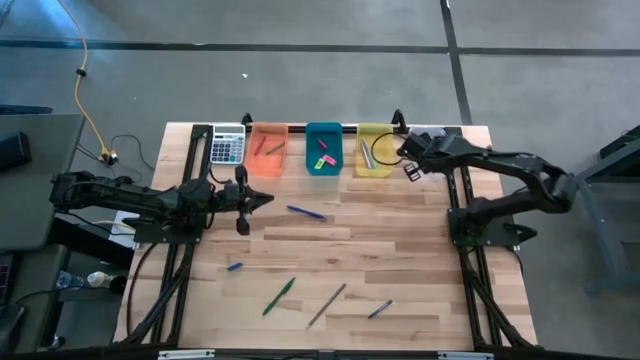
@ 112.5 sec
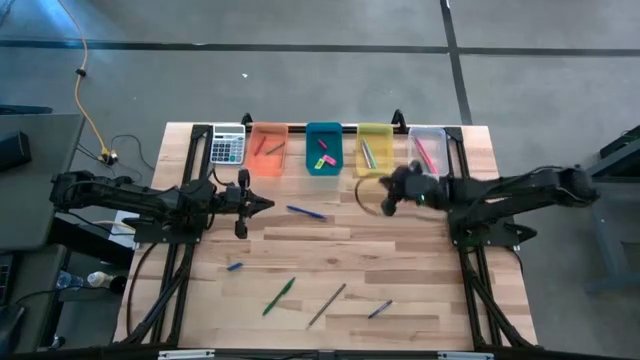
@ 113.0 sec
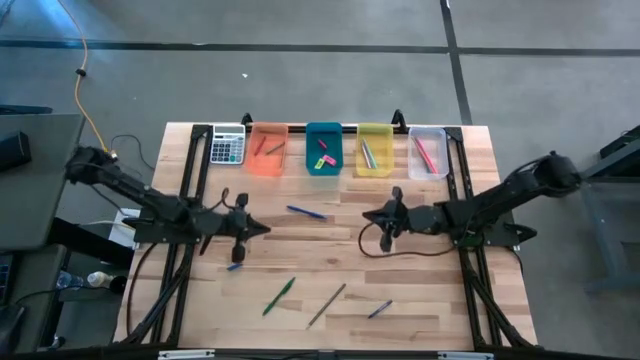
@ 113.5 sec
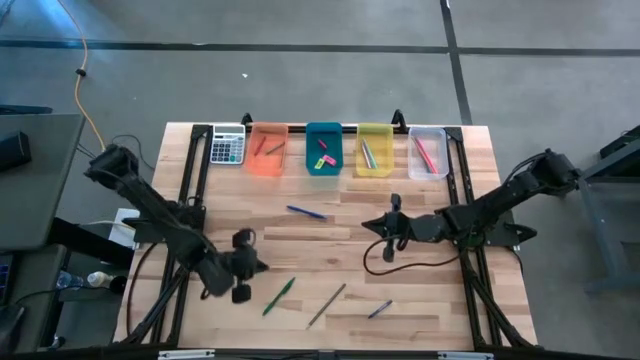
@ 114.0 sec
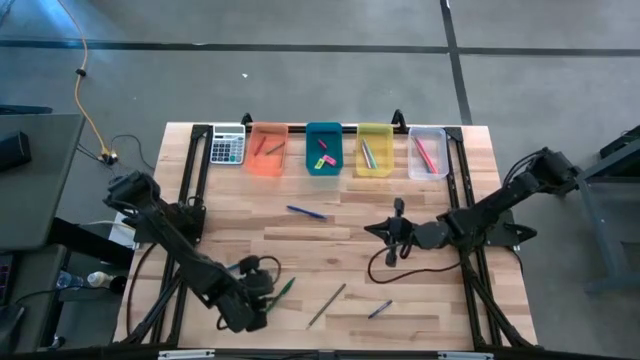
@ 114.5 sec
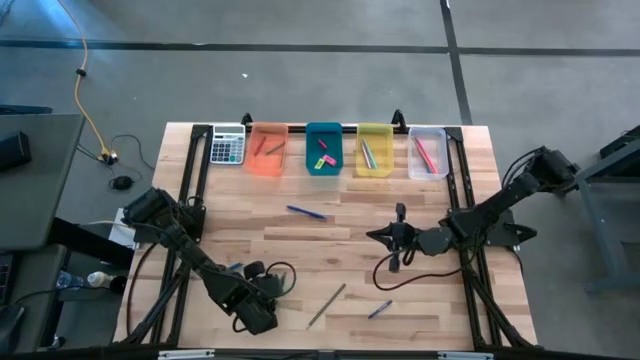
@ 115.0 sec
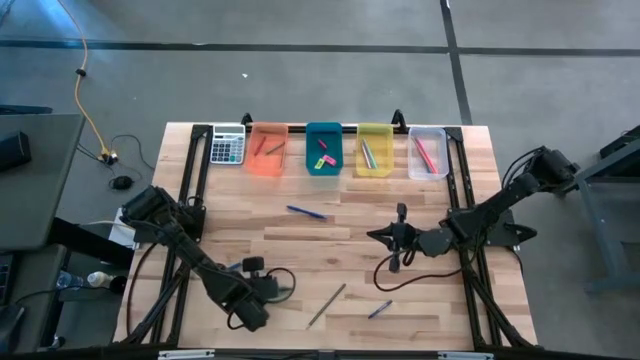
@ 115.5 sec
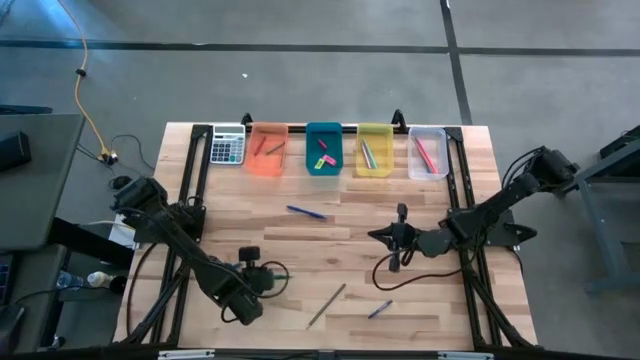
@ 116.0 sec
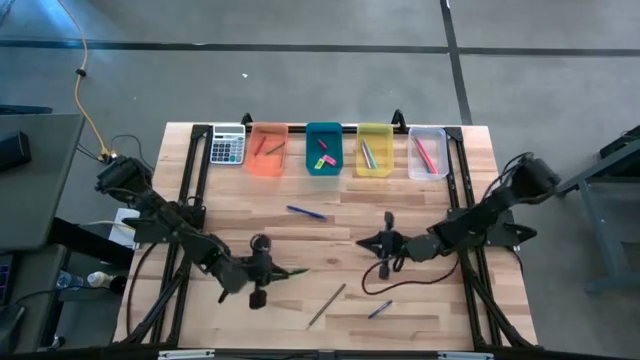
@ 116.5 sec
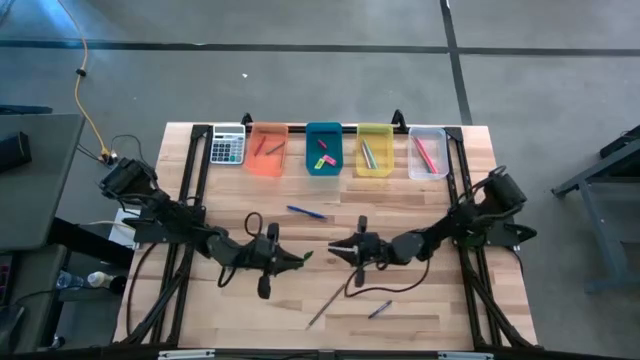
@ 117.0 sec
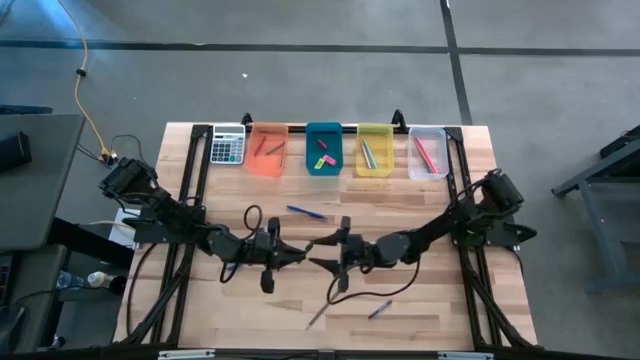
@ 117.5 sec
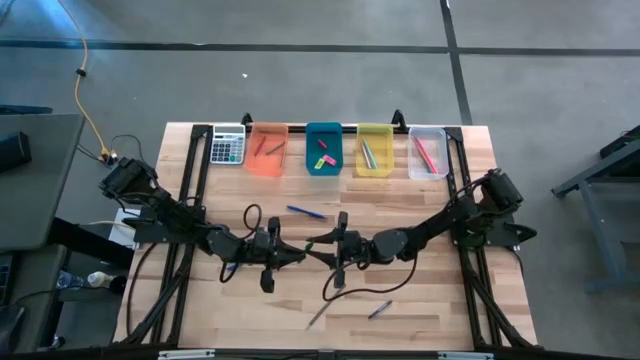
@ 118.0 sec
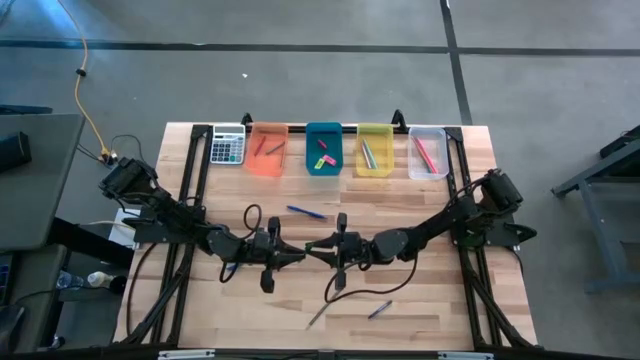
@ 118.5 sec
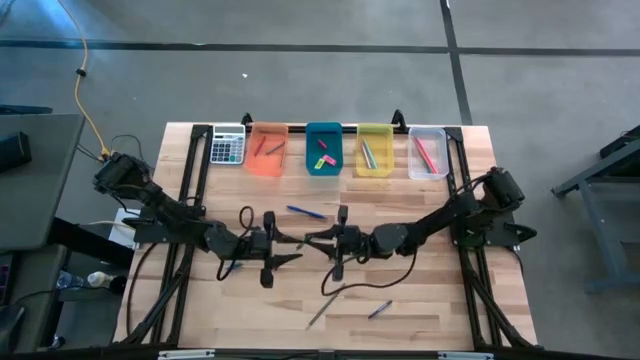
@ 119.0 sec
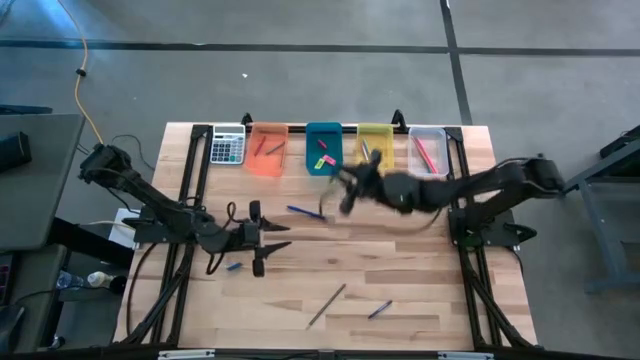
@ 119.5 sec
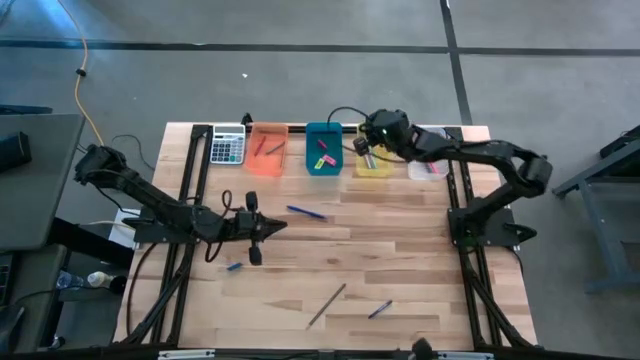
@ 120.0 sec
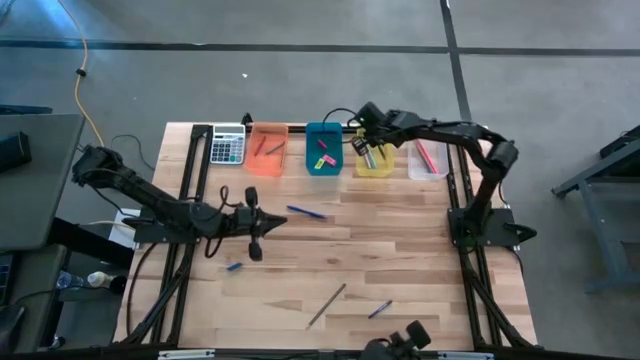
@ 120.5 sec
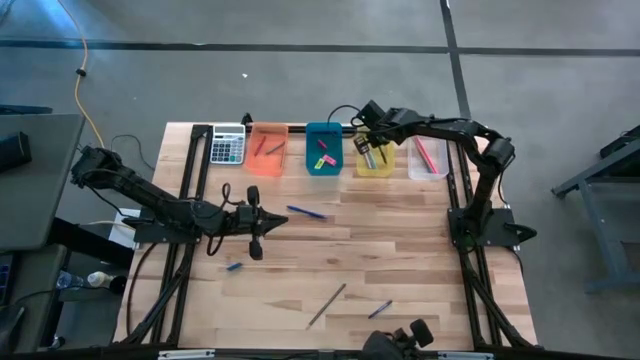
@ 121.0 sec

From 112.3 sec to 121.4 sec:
Task: Sort crayons/erasers/pens/pencils in bins
Put the dark green ballpen into the yellow bin

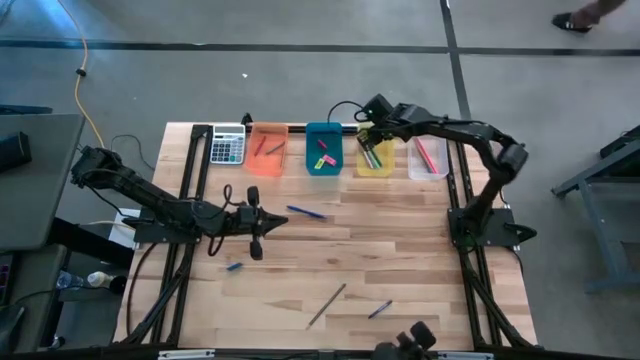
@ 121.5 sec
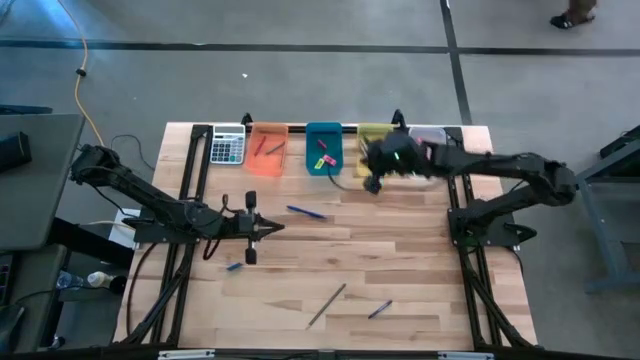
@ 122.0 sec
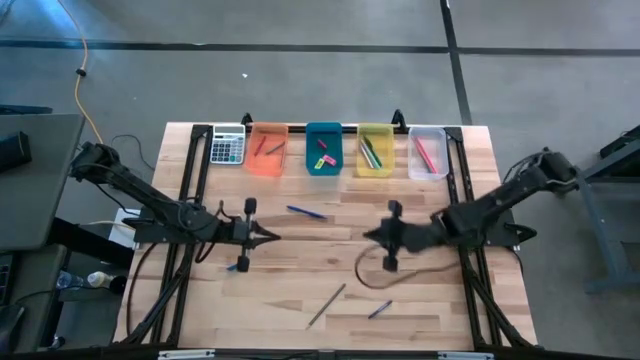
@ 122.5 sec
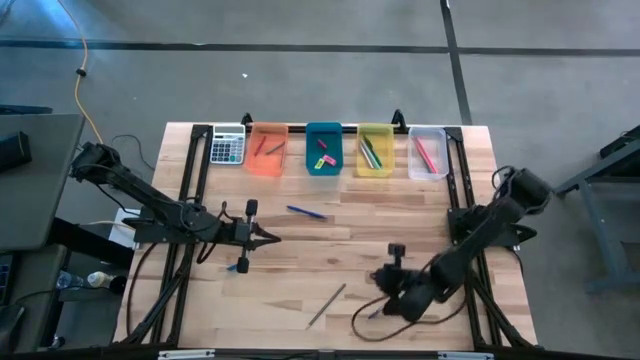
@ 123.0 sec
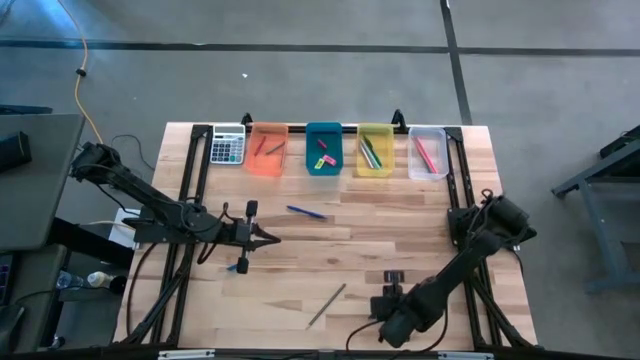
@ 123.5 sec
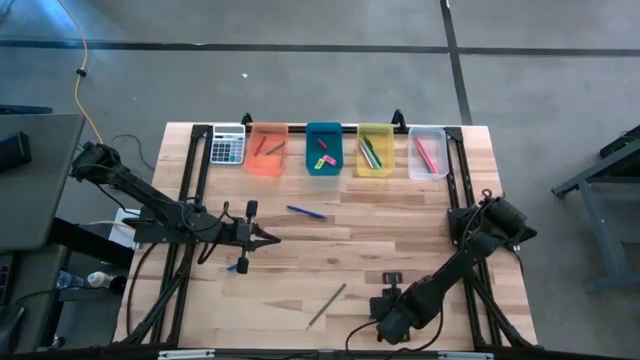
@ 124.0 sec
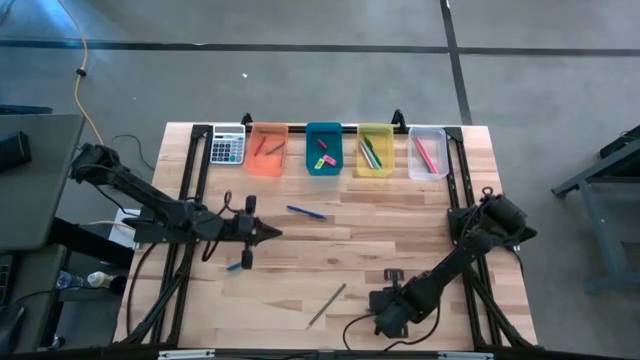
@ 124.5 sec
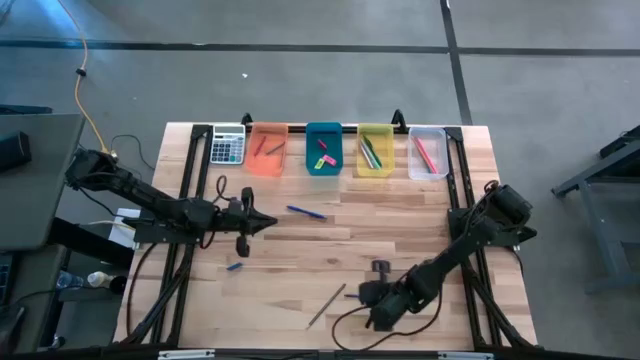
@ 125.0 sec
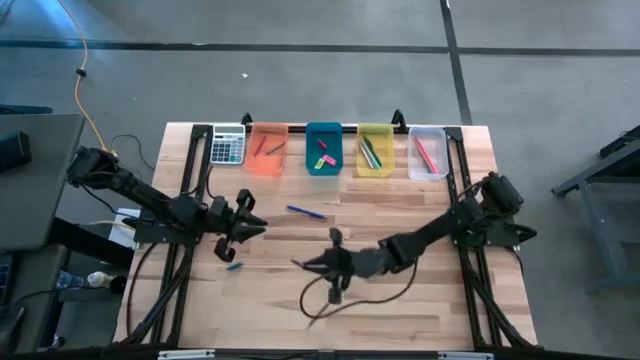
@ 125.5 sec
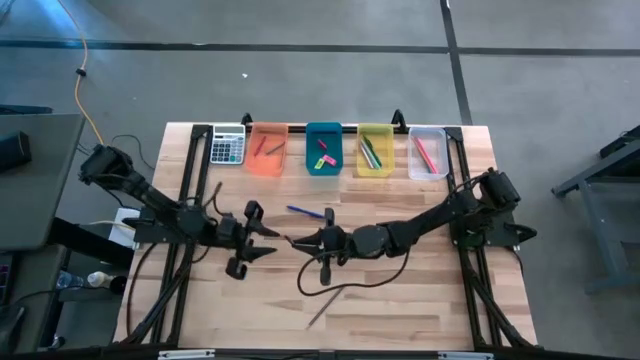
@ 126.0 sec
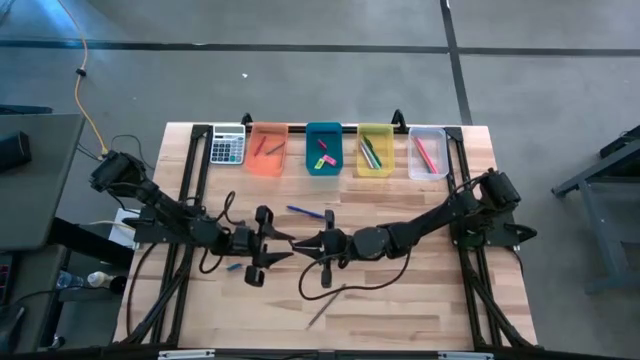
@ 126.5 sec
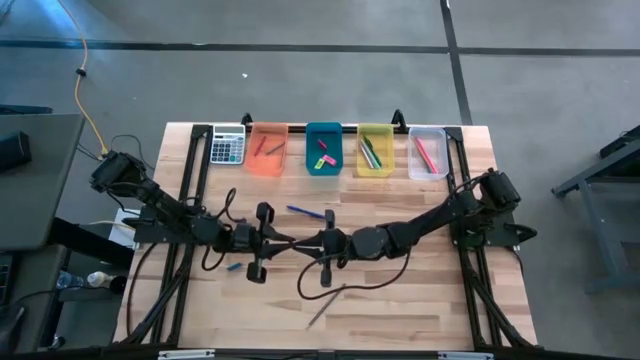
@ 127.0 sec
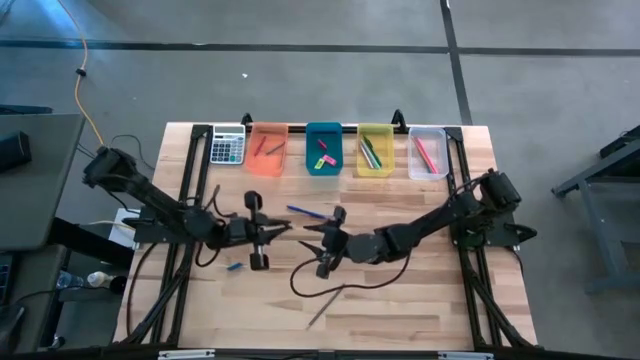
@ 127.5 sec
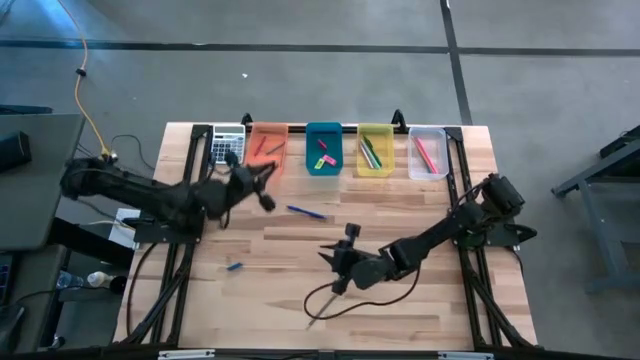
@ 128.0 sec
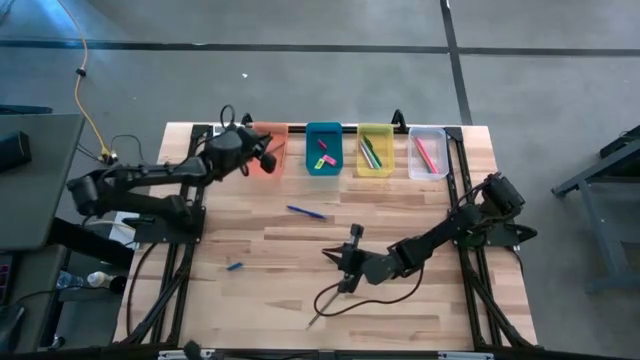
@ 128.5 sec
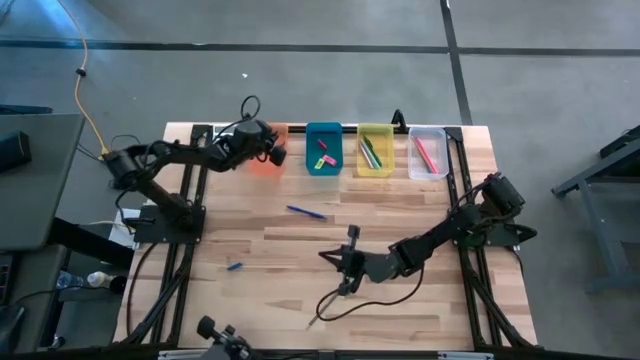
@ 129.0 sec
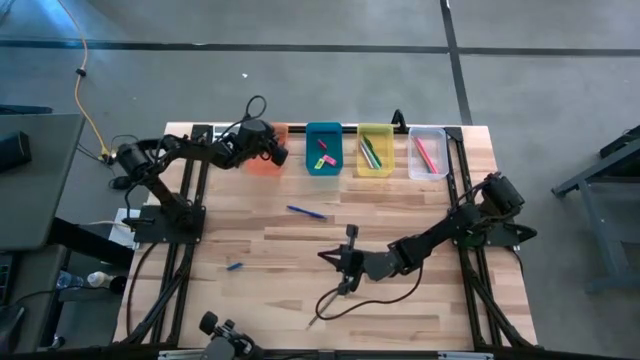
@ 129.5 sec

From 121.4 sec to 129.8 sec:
Put the blue crayon into the orange bin

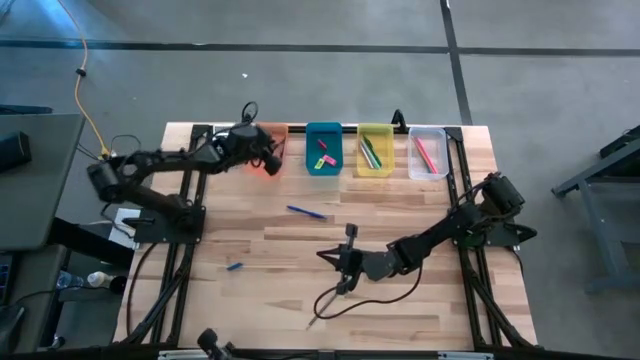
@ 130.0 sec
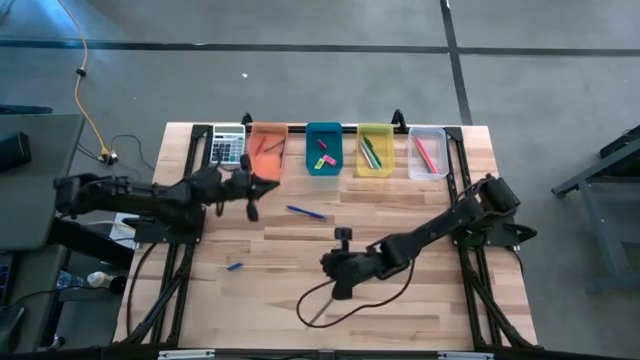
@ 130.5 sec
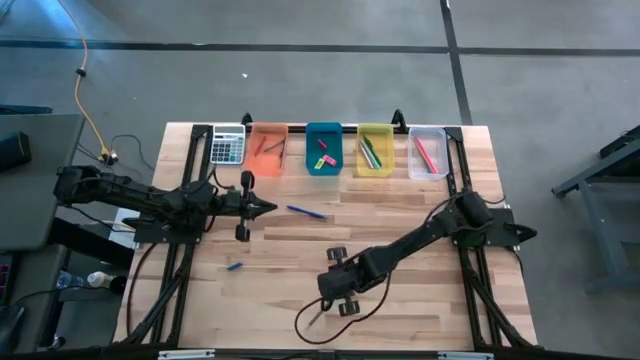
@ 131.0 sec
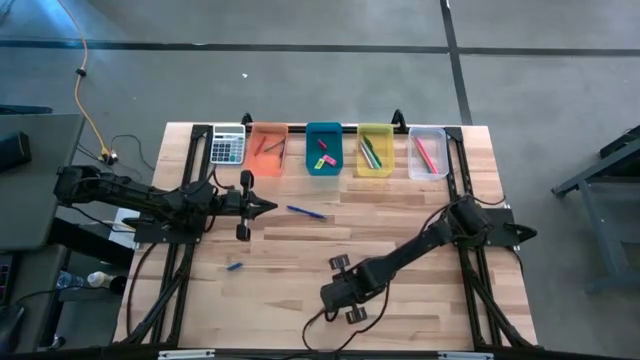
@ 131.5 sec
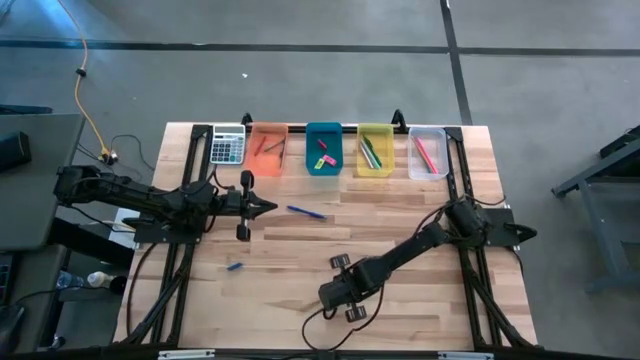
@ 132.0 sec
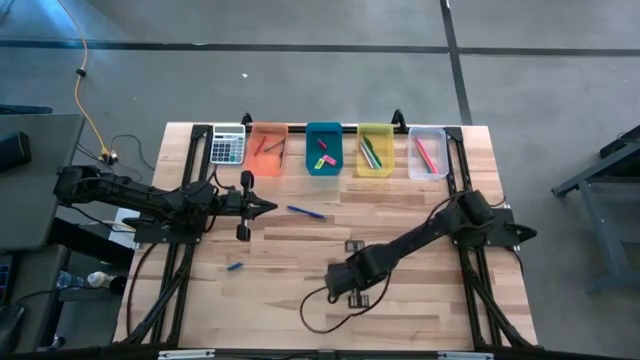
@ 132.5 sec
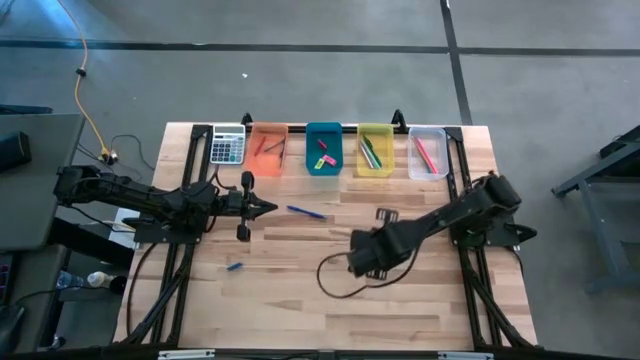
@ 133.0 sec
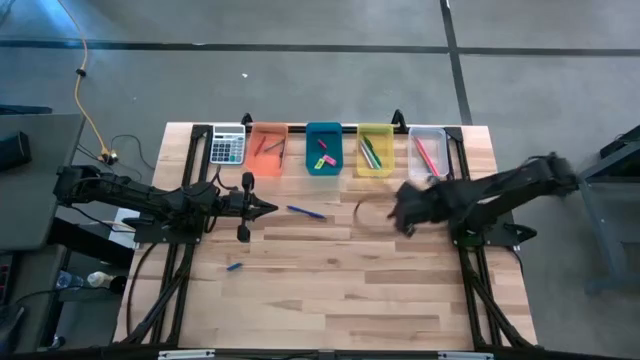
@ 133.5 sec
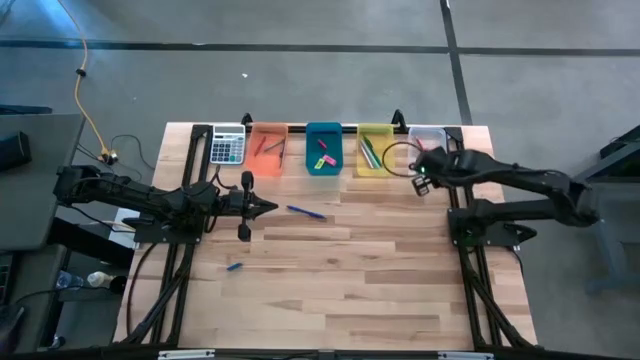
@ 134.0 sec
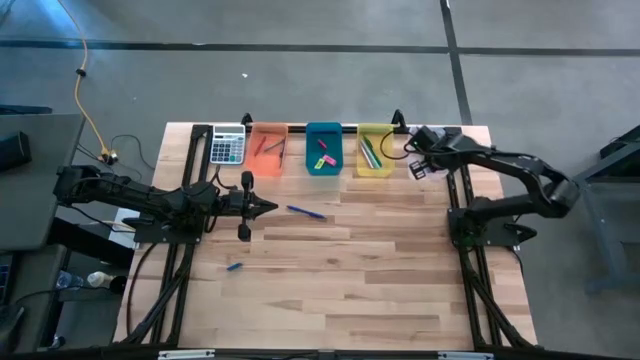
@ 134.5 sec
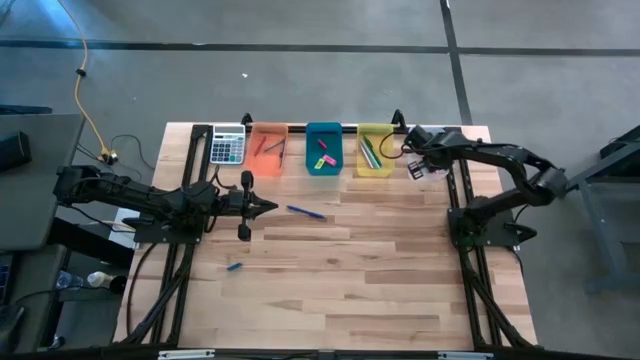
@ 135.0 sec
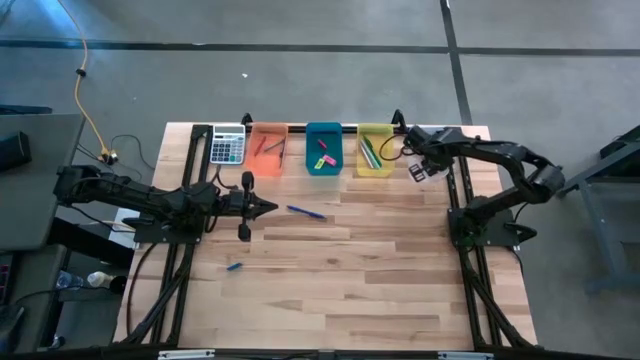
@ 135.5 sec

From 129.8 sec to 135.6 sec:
Put the black pencil into the transparent bin
